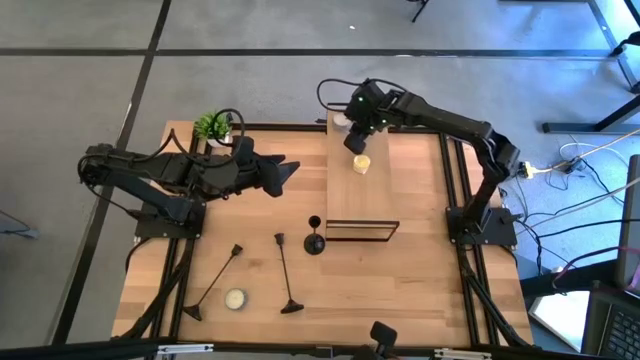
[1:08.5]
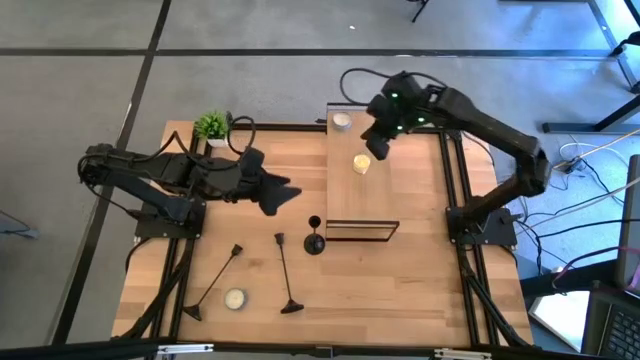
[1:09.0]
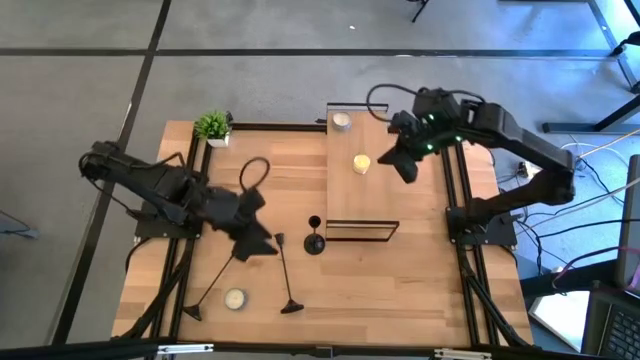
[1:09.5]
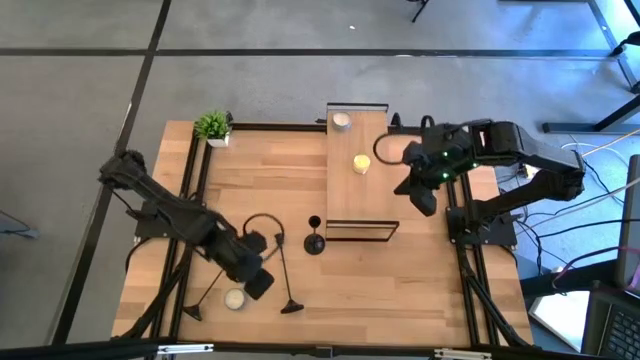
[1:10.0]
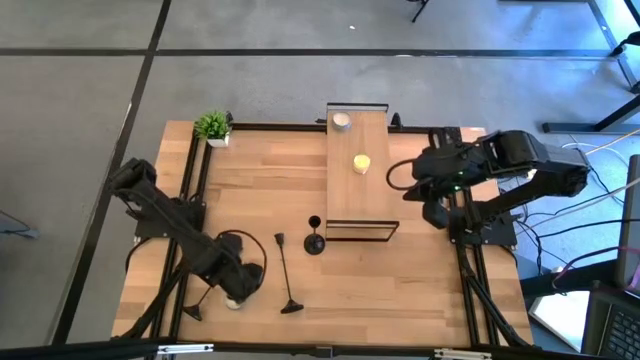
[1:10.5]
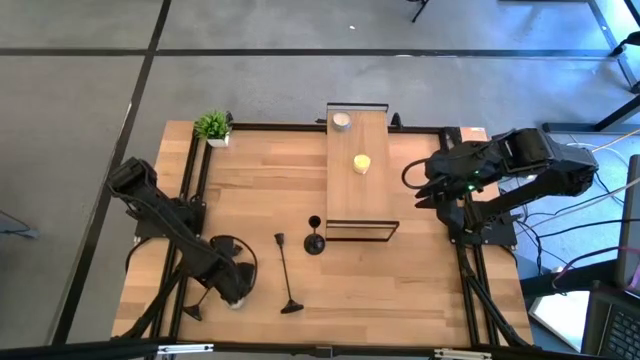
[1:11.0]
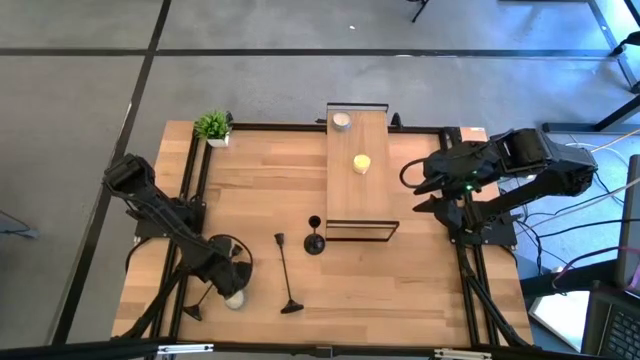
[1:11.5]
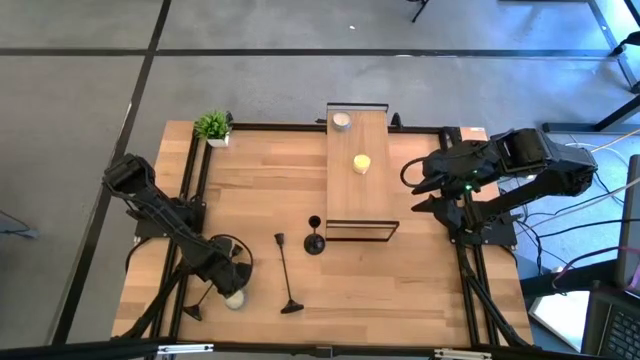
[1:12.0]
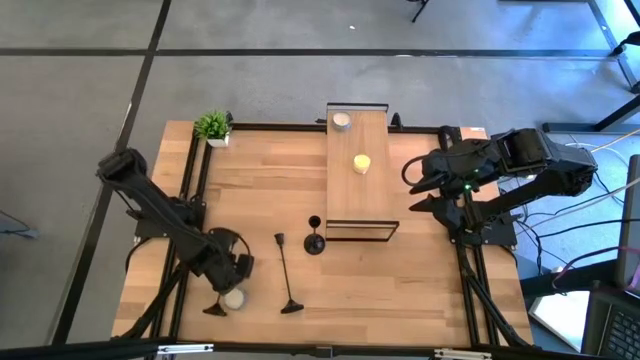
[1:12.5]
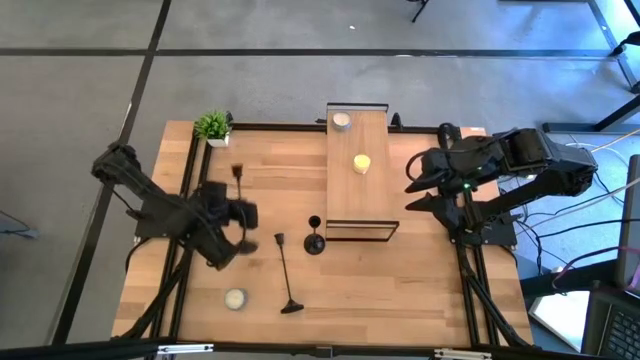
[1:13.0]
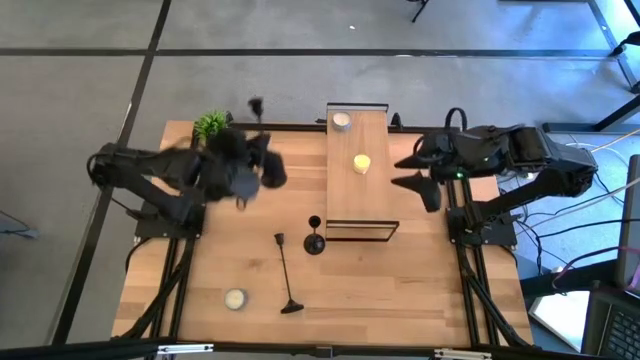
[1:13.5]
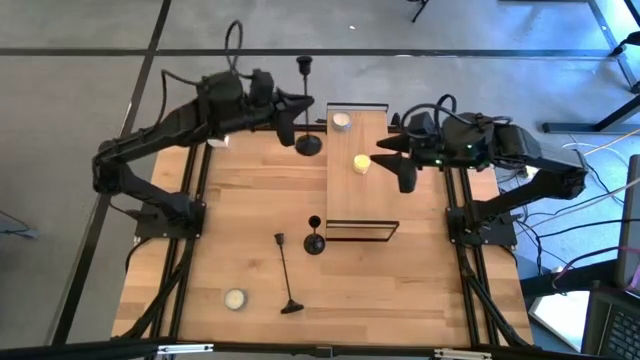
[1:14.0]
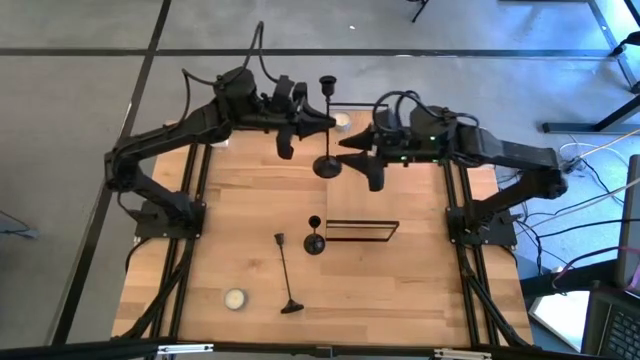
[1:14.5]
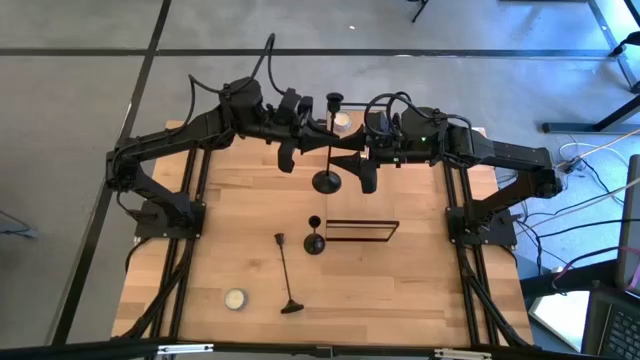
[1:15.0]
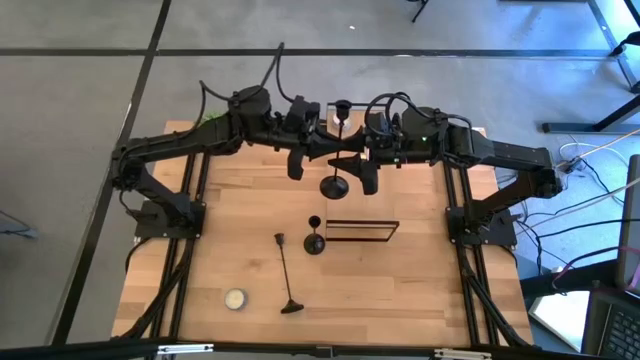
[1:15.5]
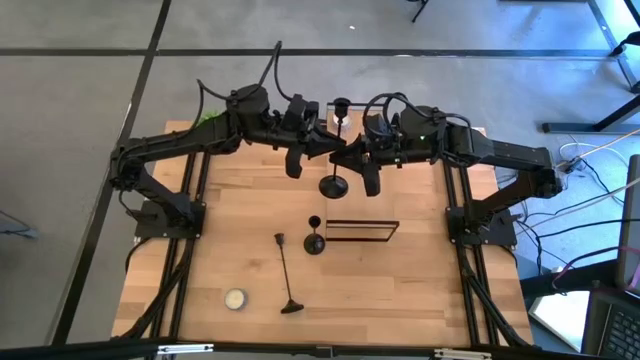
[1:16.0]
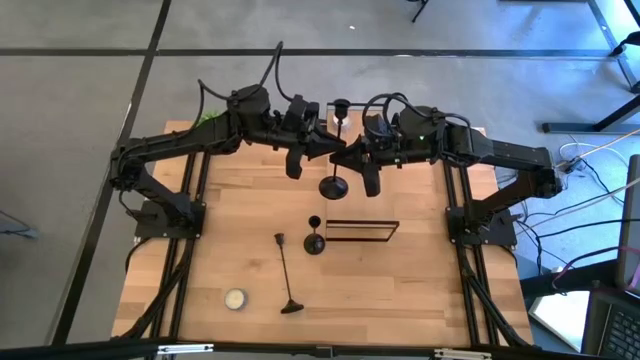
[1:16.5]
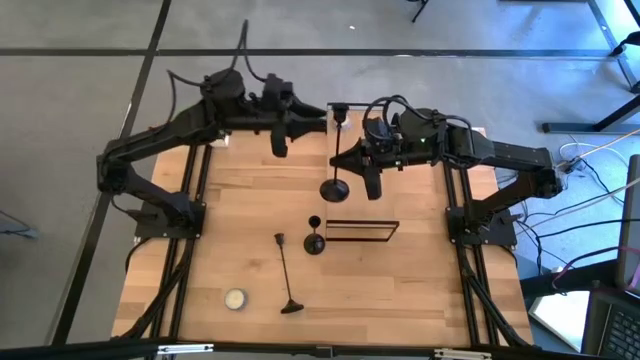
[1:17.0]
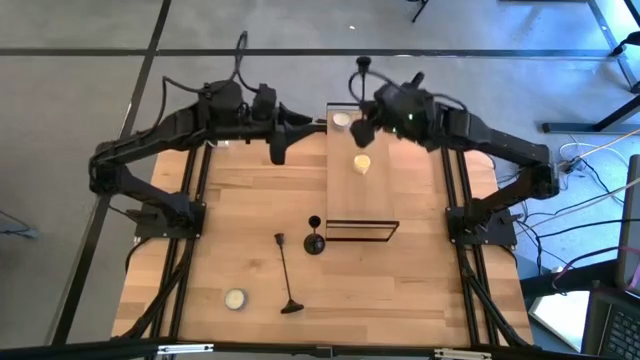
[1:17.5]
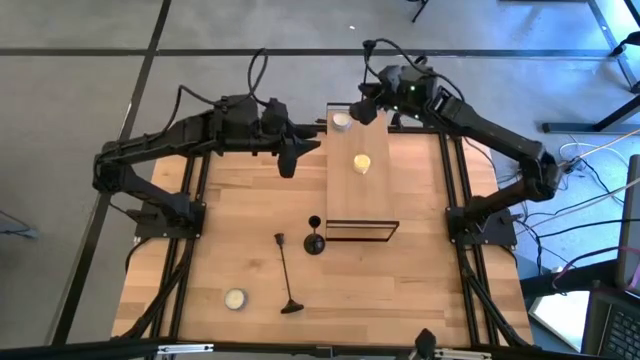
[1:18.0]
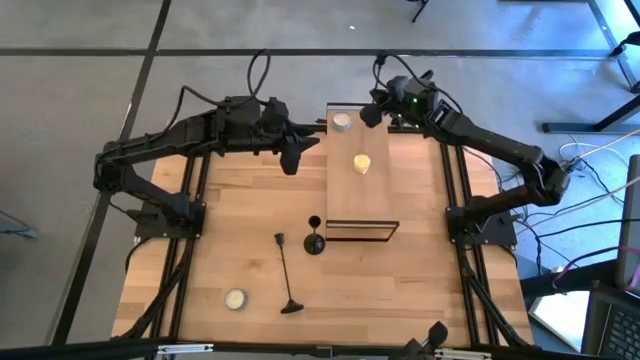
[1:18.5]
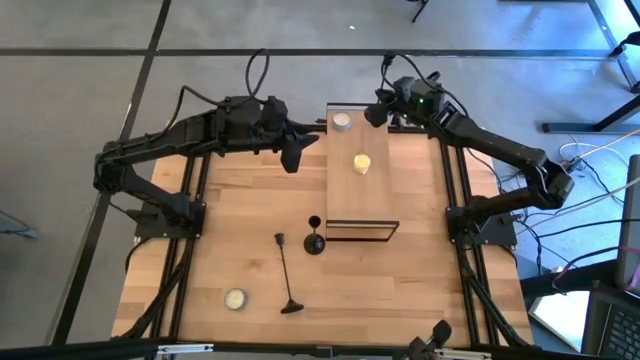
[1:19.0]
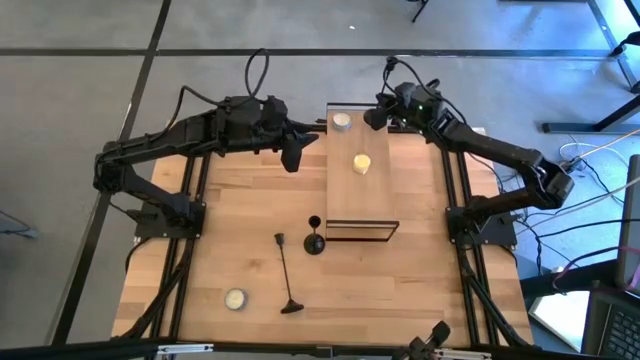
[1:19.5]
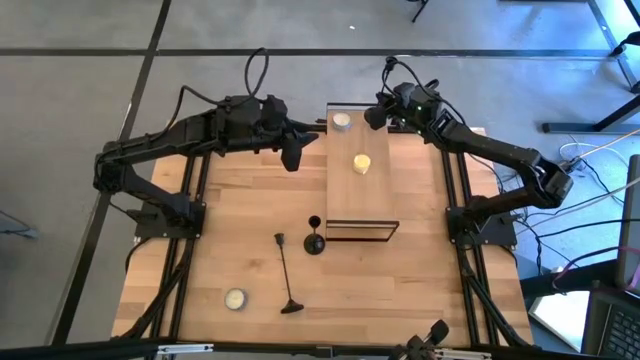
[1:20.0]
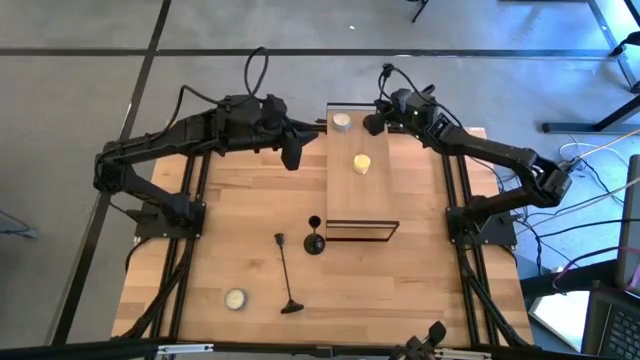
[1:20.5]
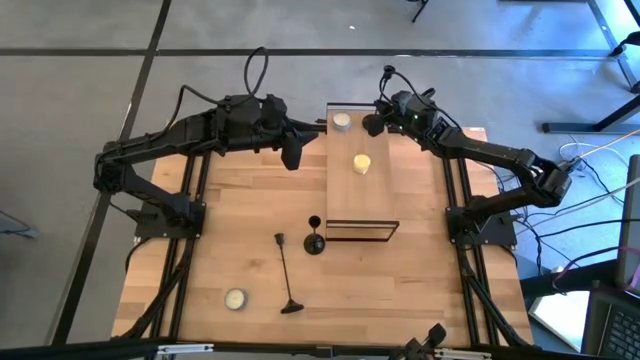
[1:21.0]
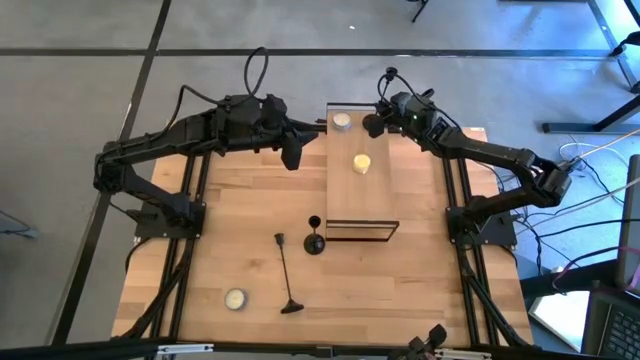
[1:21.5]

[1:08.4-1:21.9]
Task: Pick & Place candle stick holders
Put the left black candle holder to the right of the blue candle jar on the shelf

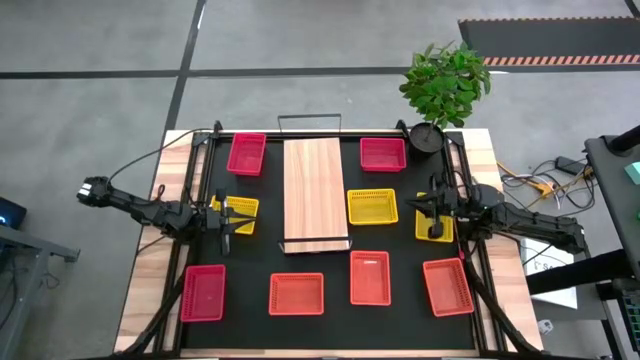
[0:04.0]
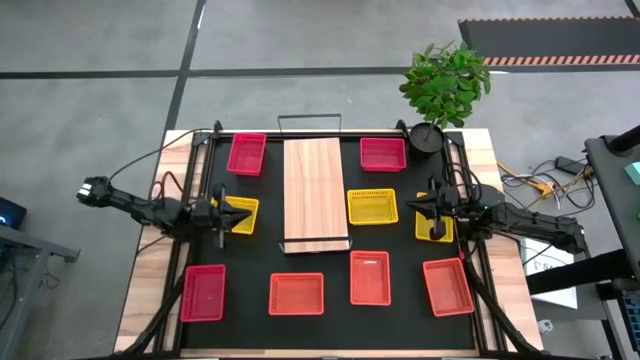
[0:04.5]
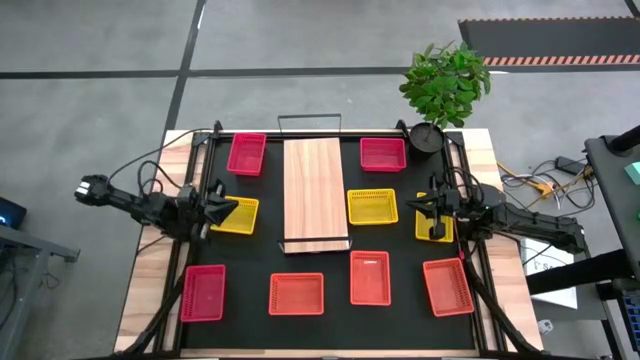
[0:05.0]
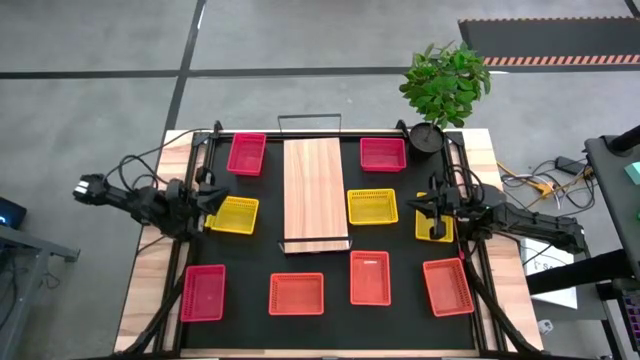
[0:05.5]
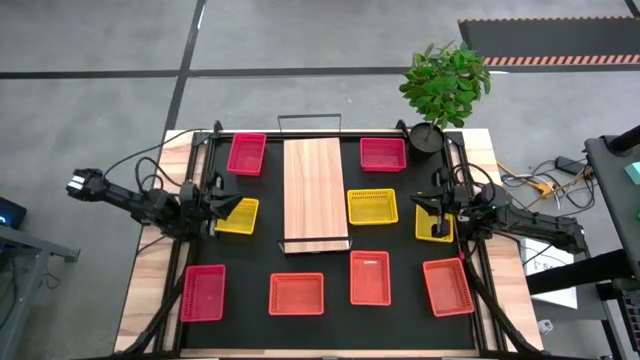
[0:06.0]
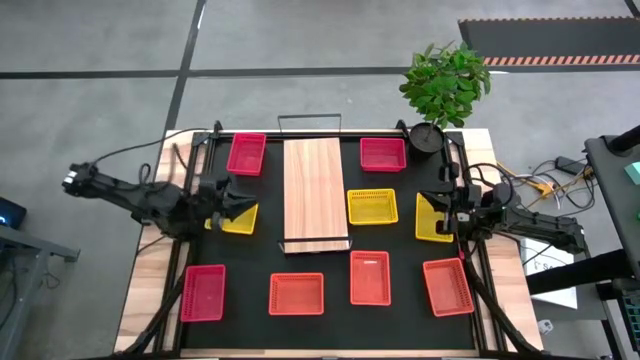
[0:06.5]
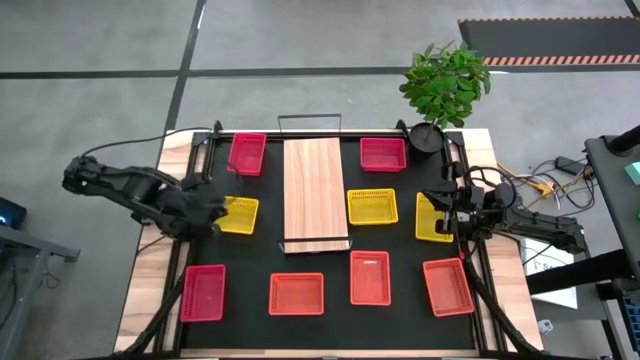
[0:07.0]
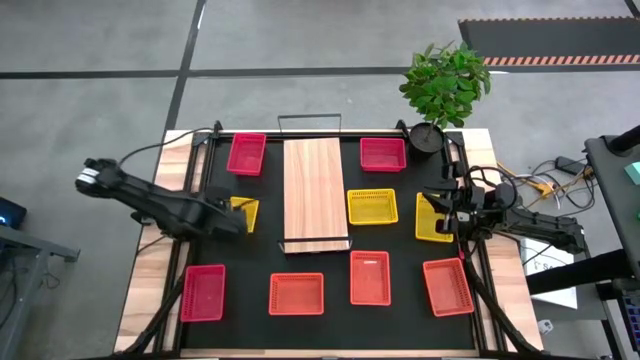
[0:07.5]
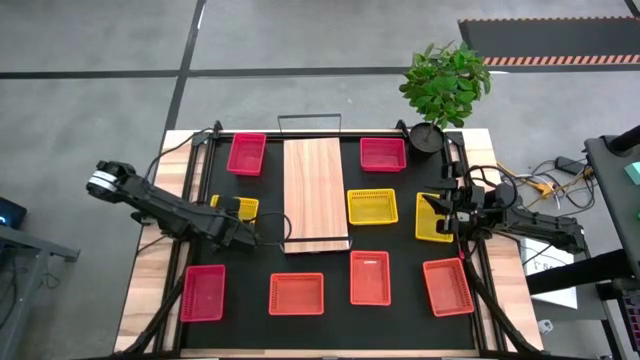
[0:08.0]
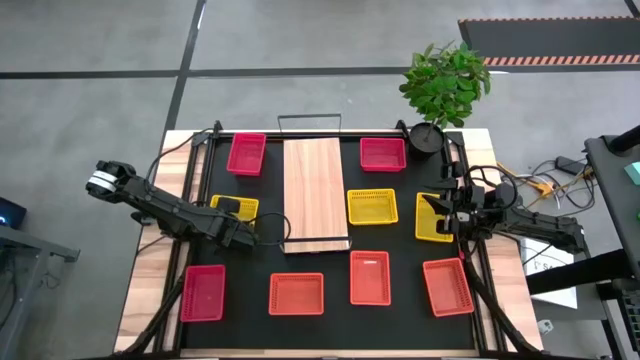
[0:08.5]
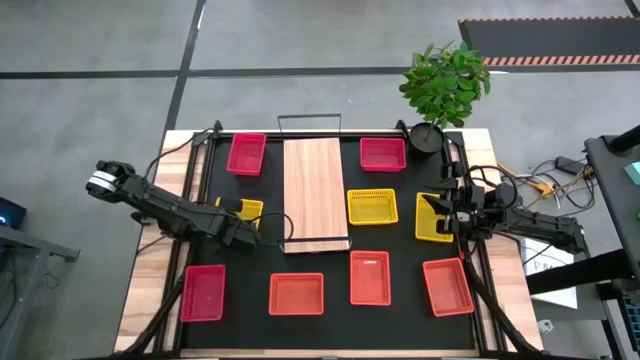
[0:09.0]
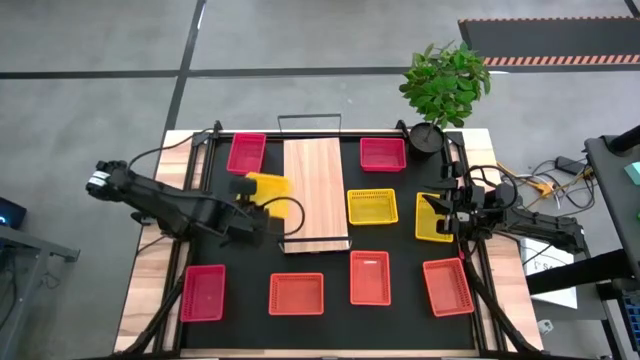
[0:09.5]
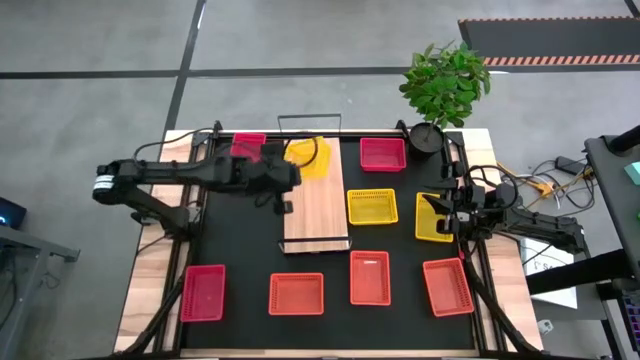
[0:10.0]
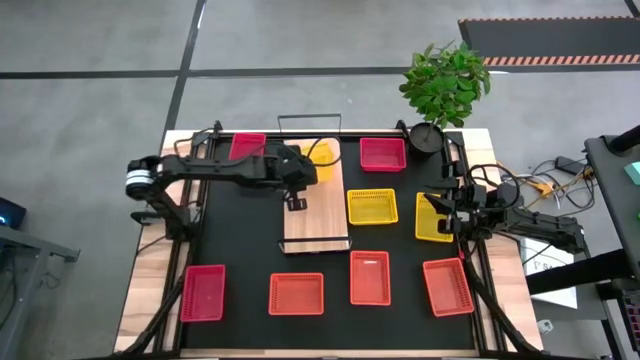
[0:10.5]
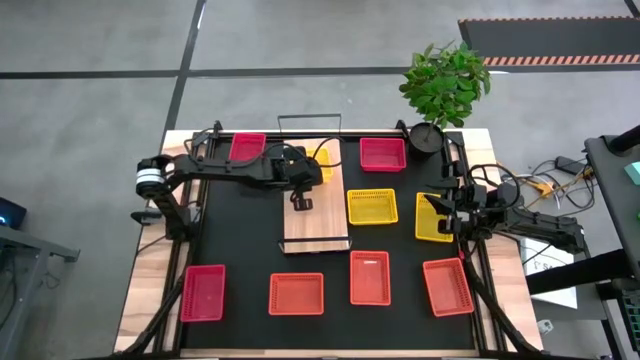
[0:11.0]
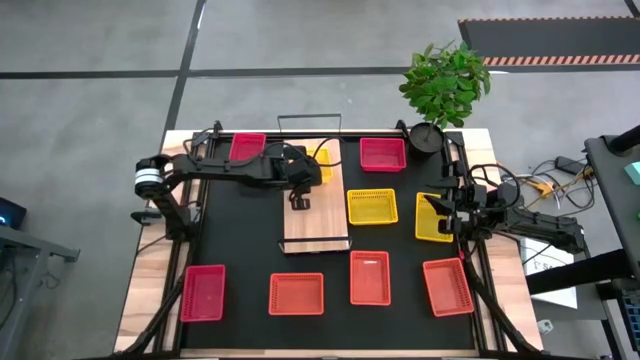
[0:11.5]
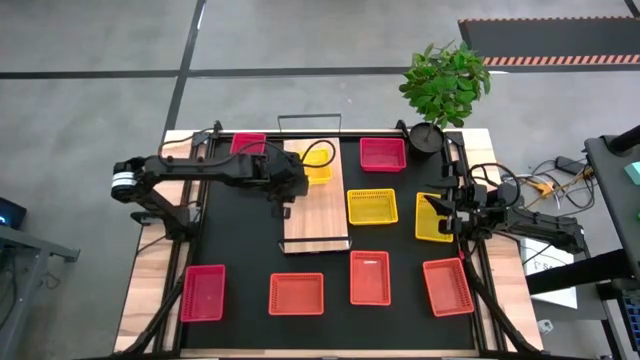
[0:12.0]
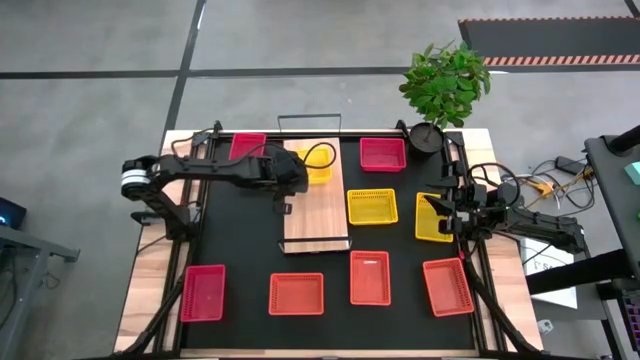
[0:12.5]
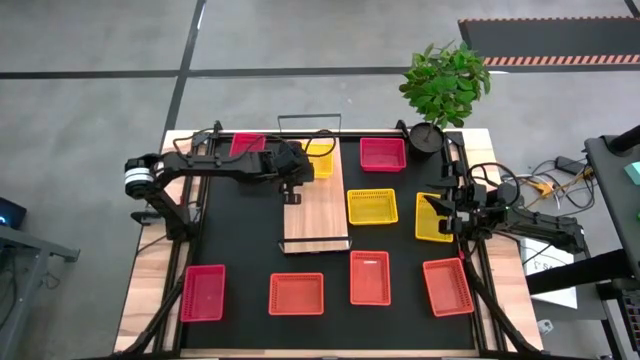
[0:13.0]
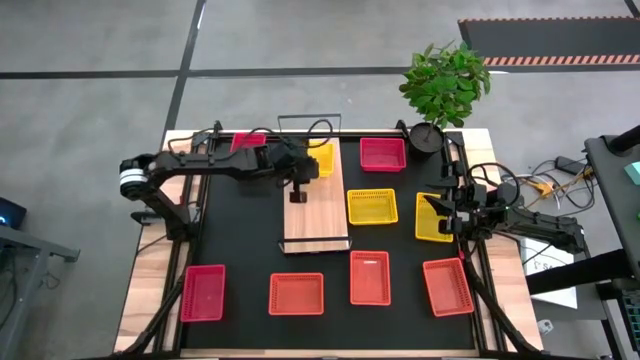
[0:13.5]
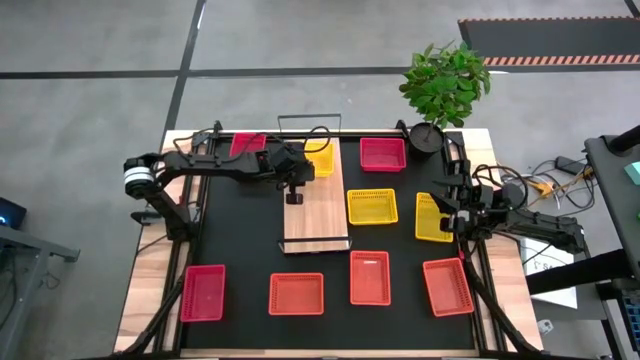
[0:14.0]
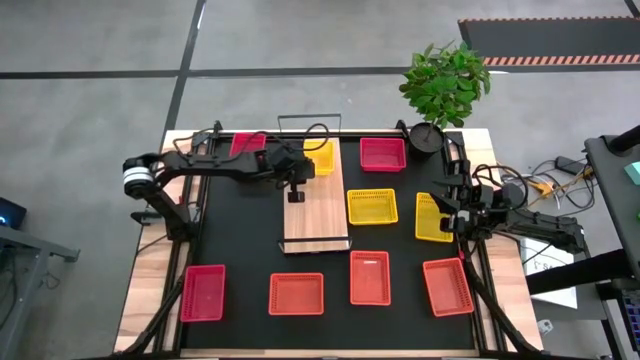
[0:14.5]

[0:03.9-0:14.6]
Task: Stack baskets on shelf by color
Put the left yellow bin on the shelf
